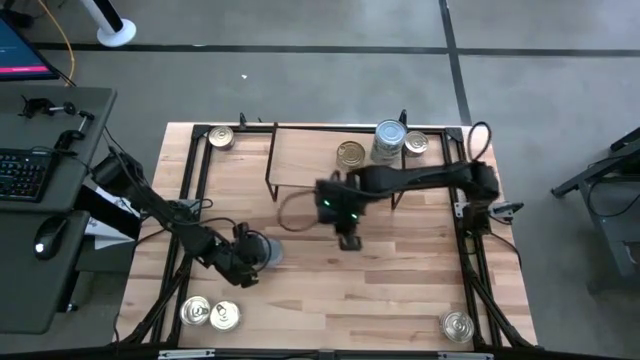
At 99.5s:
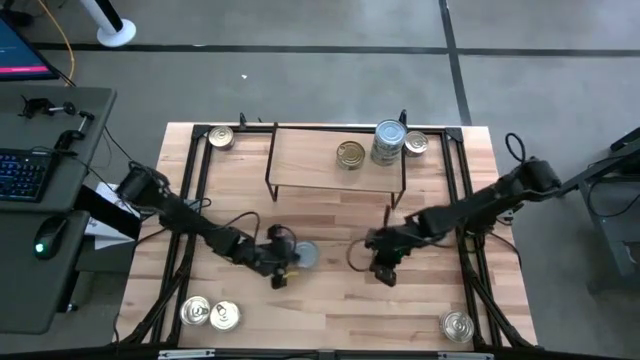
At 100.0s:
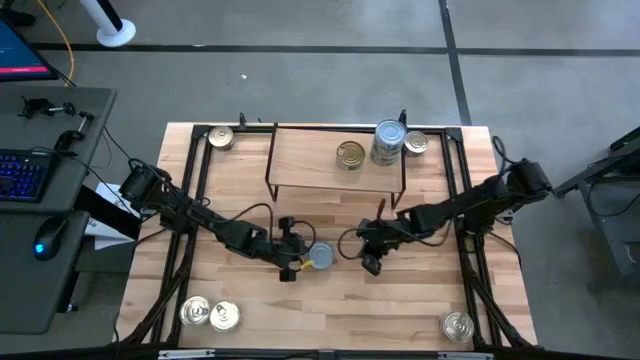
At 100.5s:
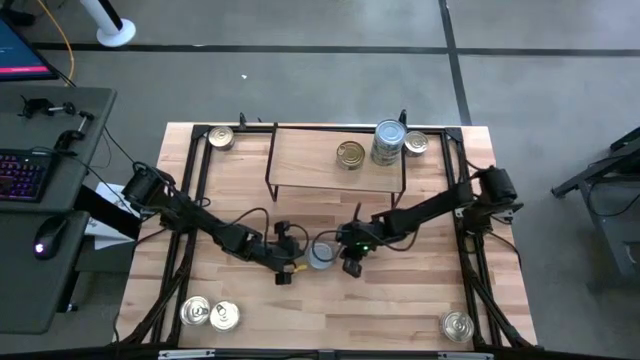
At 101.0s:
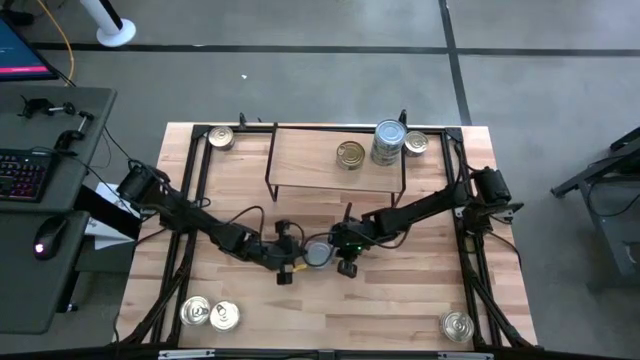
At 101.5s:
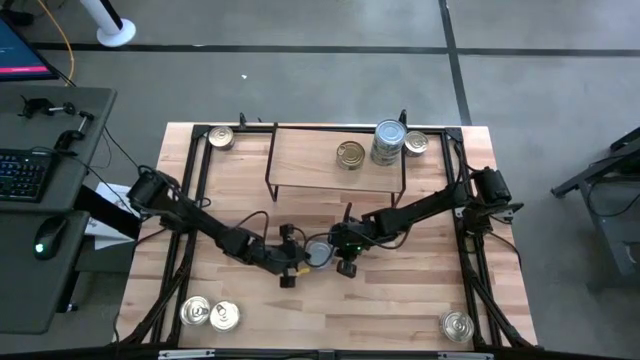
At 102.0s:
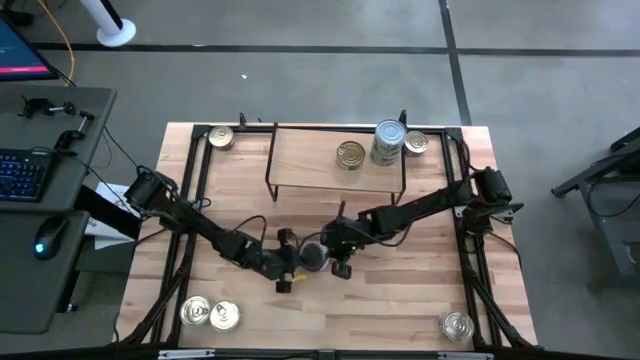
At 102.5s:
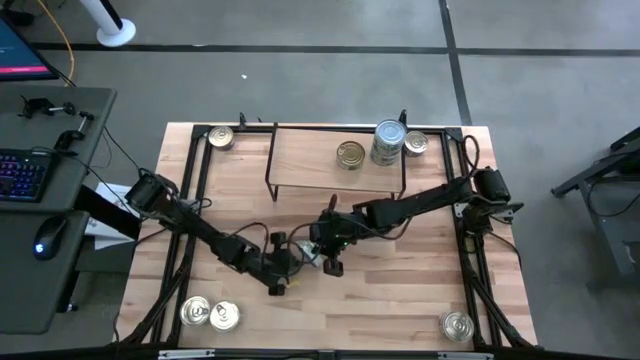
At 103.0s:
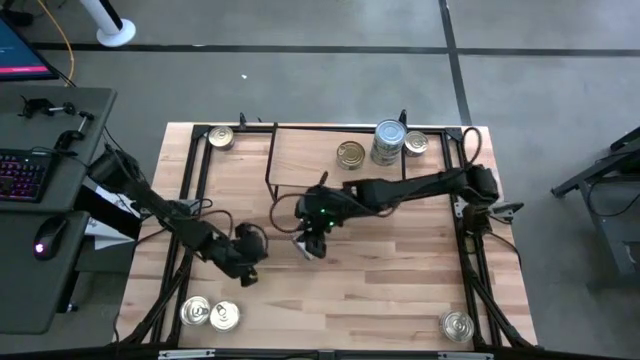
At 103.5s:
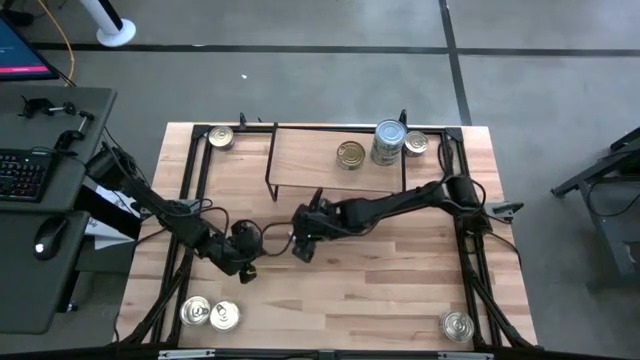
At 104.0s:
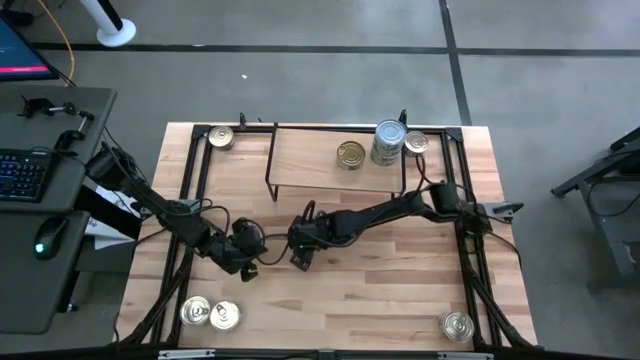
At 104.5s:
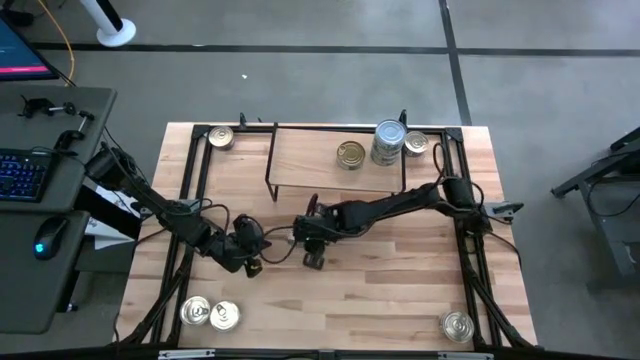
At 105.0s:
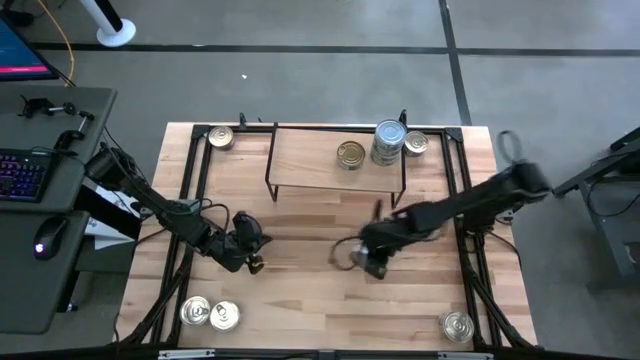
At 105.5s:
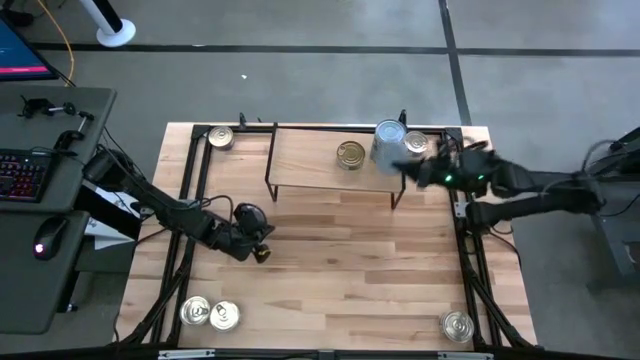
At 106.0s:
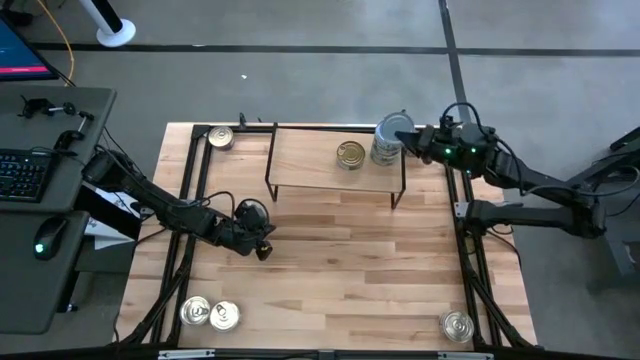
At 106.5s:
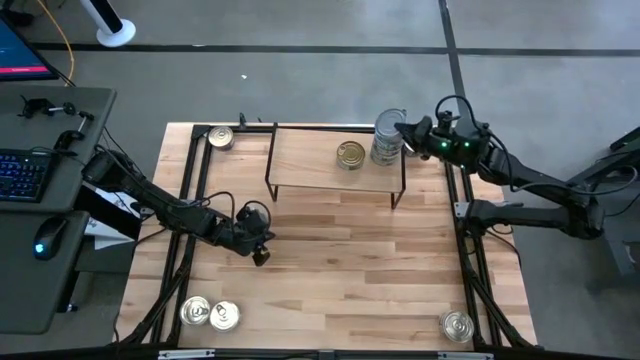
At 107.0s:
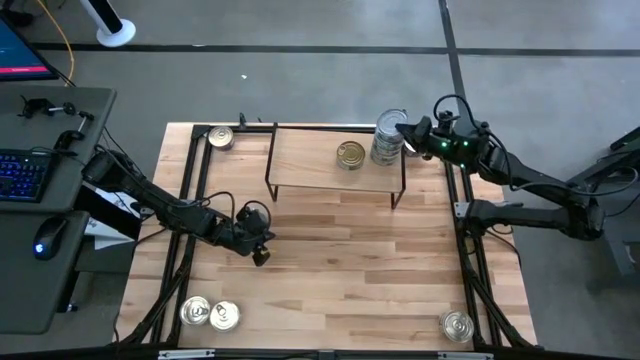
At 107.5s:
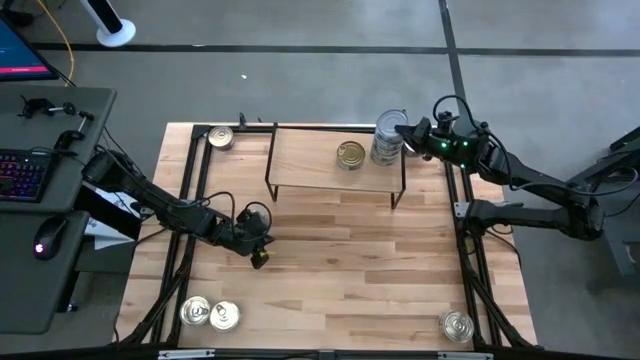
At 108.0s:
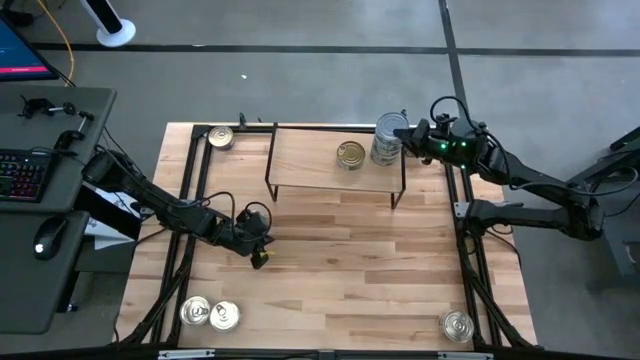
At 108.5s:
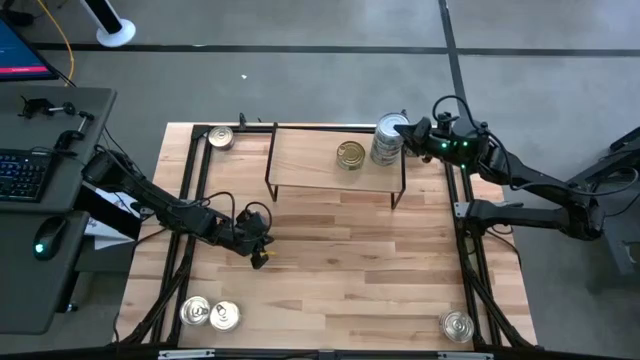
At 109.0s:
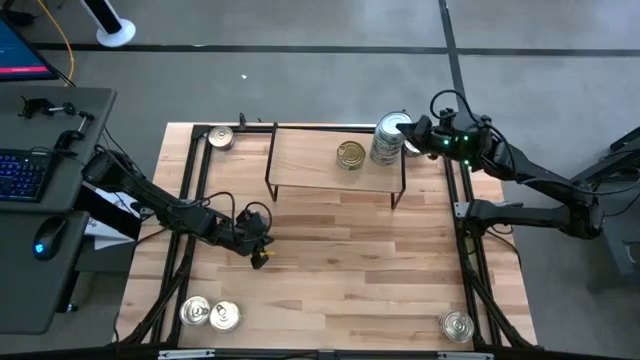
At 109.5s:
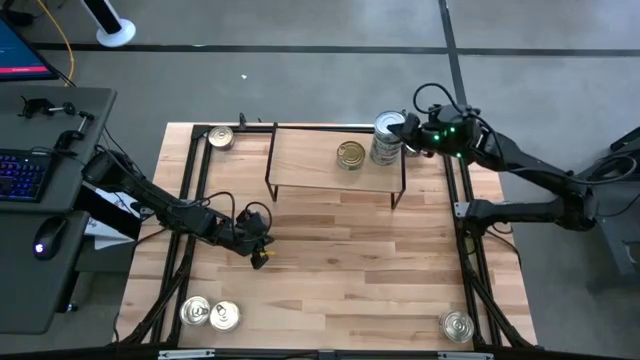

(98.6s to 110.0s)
Task: Stack canned seafood by type on shelf
Stack the green white tuna can on top of the other green white tuna can on the shelf

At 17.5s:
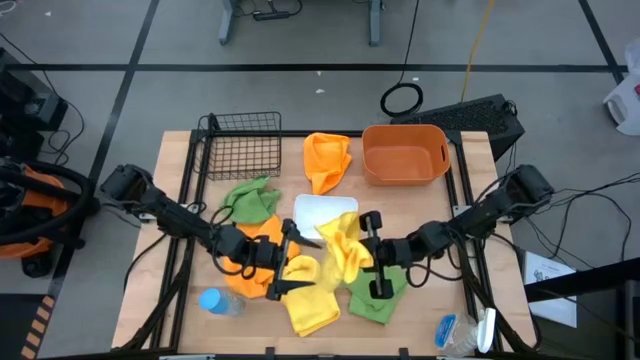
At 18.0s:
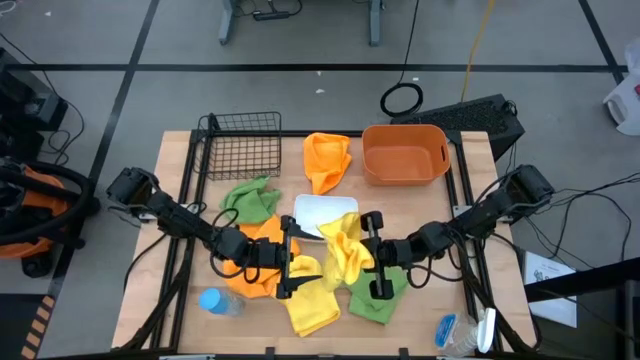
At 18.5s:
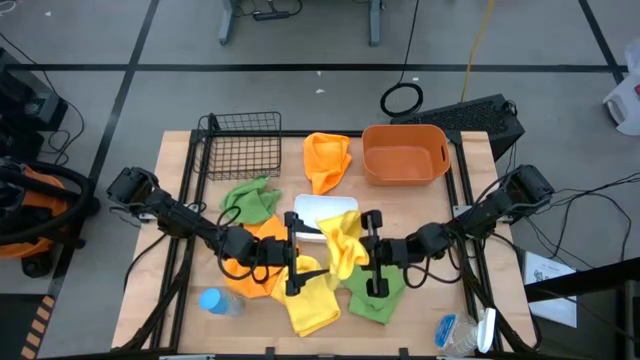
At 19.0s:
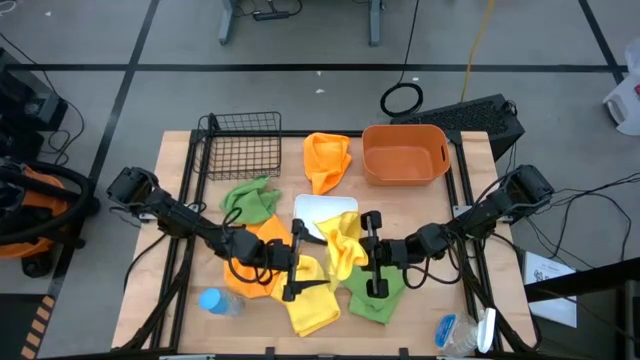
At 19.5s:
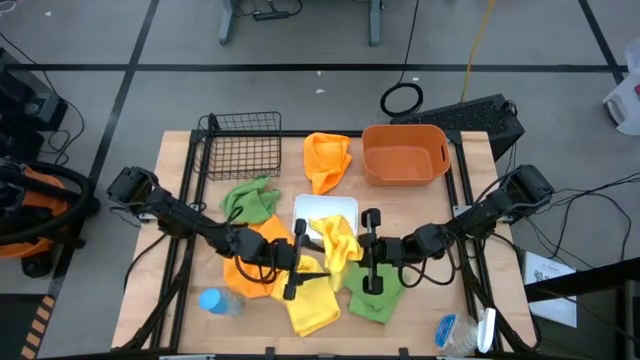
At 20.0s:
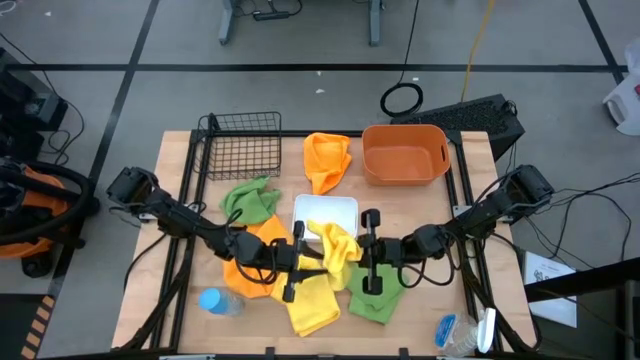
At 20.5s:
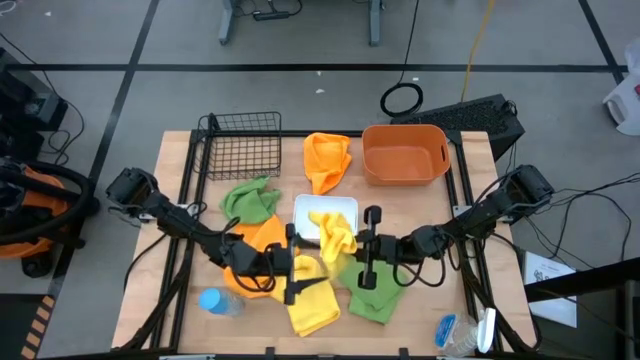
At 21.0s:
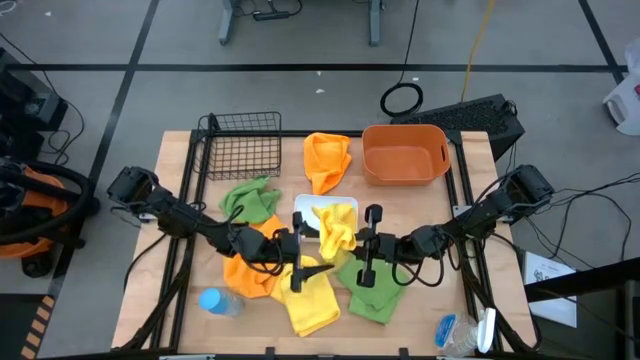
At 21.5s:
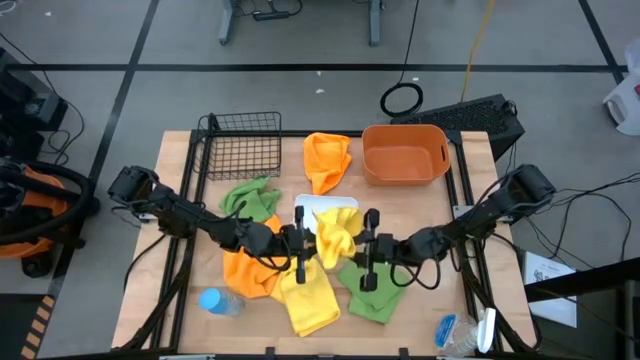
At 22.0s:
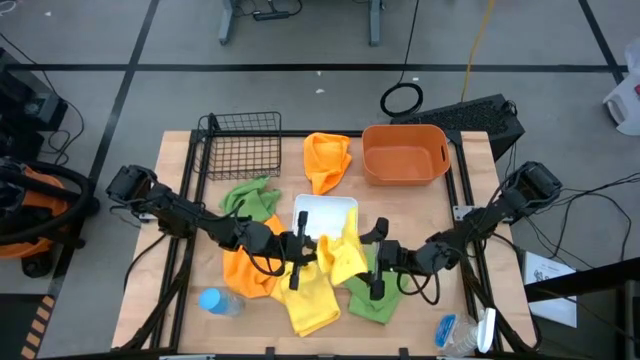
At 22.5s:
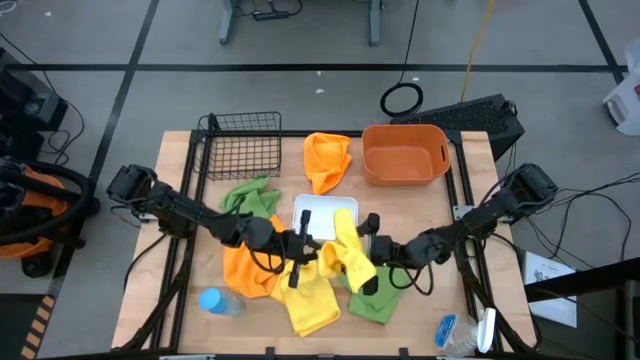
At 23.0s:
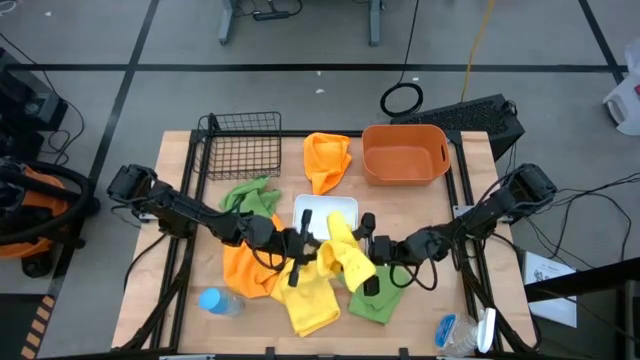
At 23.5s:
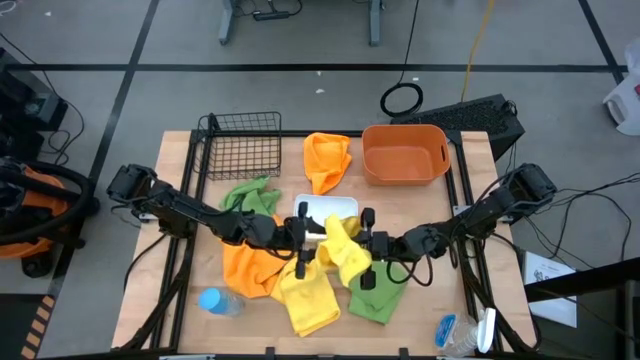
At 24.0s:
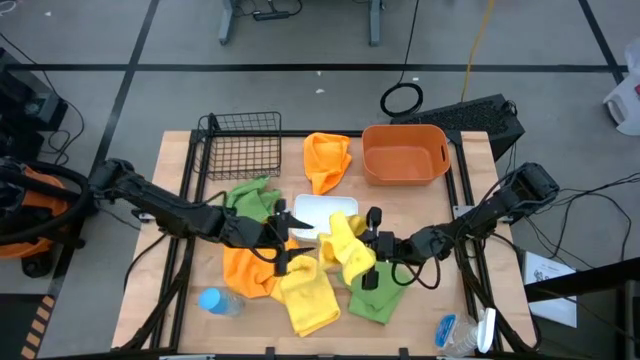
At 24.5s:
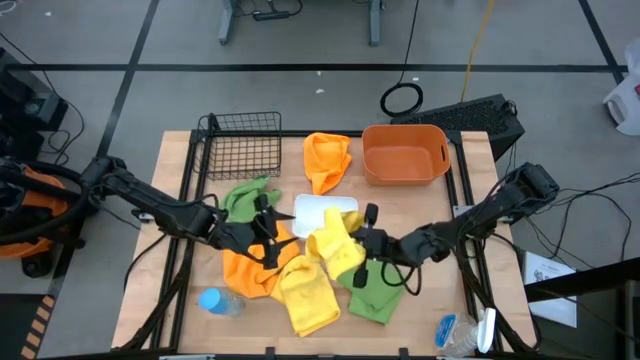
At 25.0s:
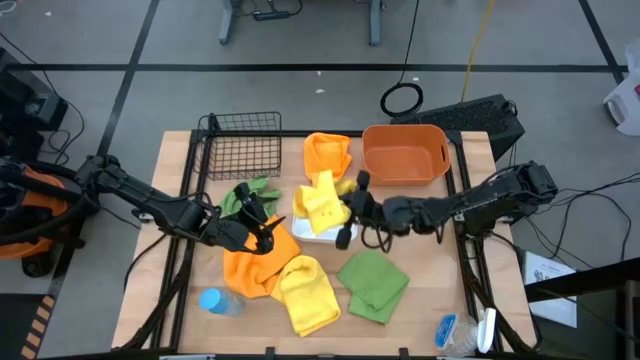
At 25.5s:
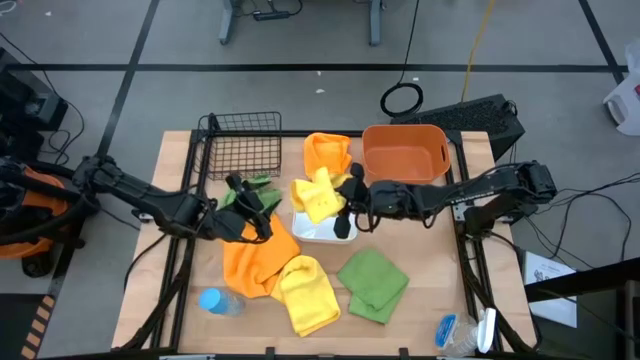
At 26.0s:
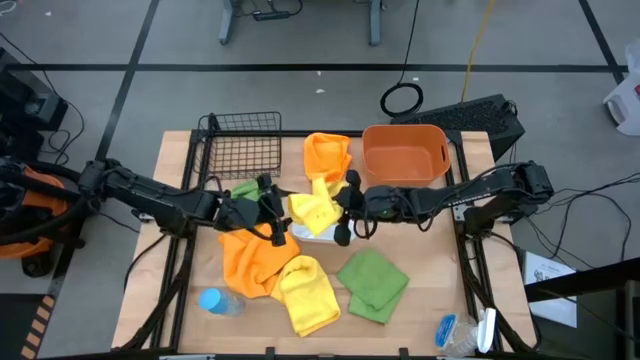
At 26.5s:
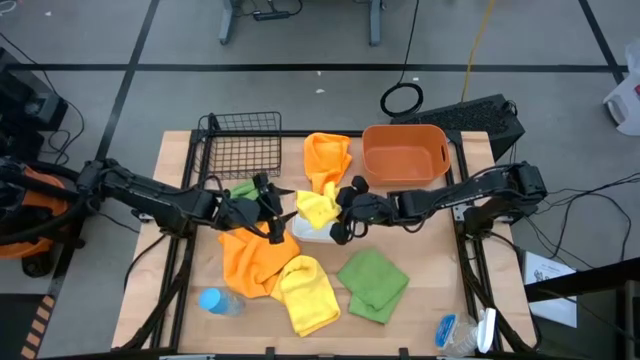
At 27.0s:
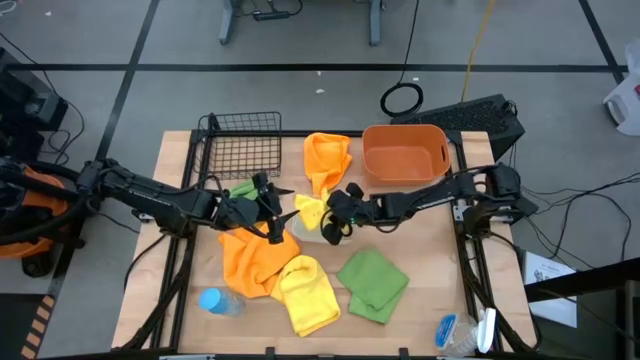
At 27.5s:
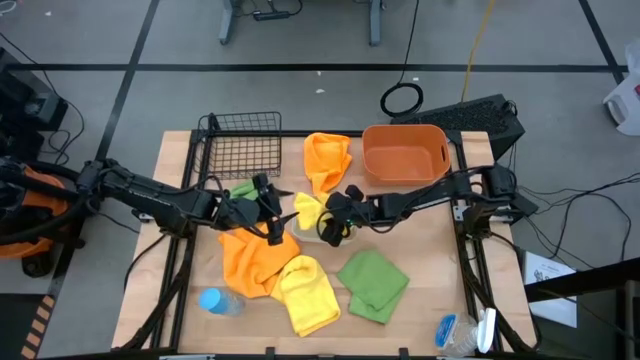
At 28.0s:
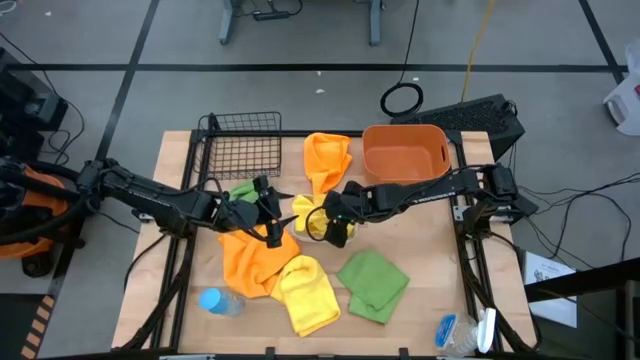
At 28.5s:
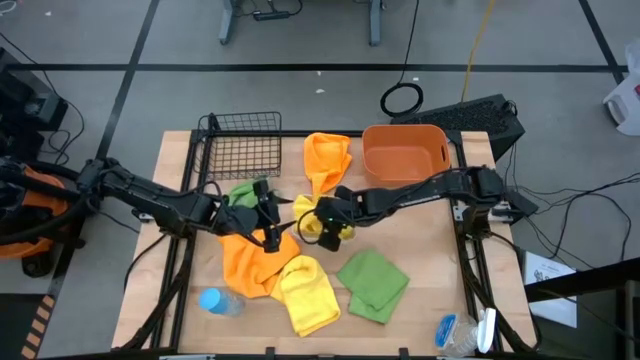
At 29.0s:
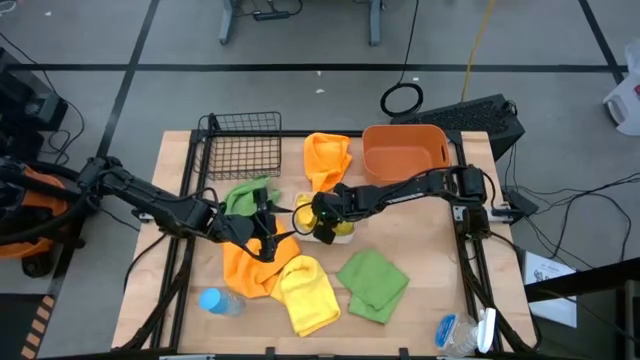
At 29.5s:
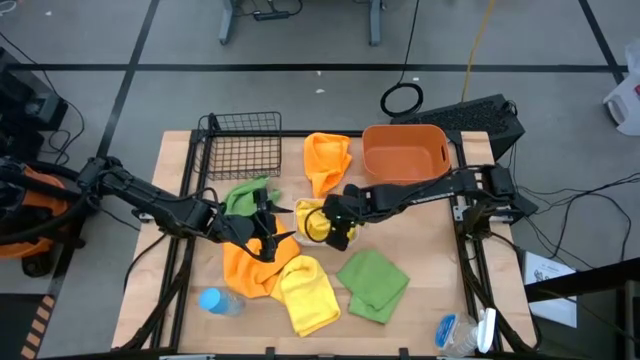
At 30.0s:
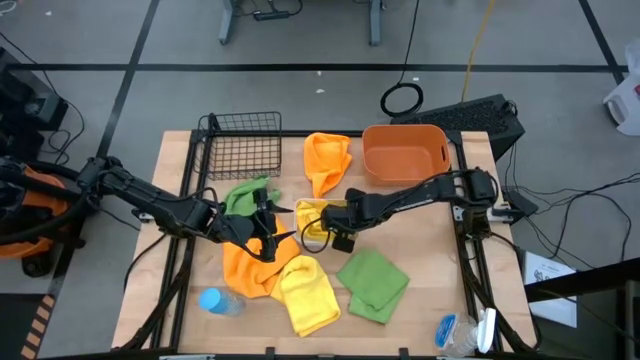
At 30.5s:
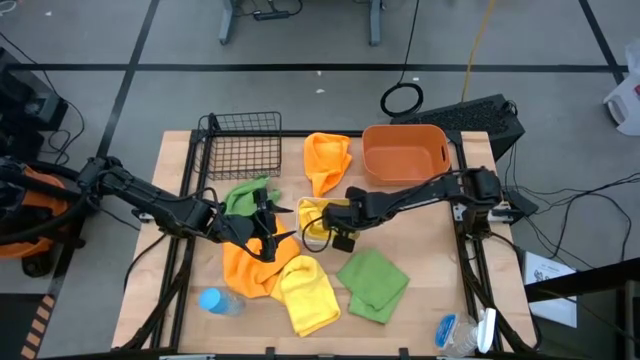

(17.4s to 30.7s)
Task: Sort microfiber towel by color & place in baskets
Put the top yellow microfiber towel into the white bin
